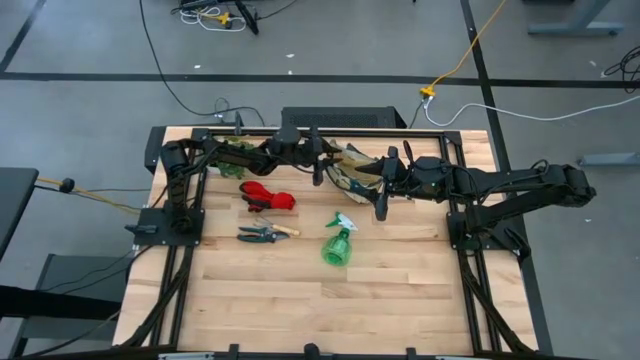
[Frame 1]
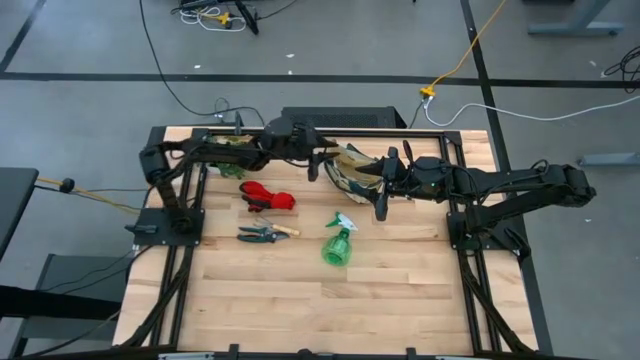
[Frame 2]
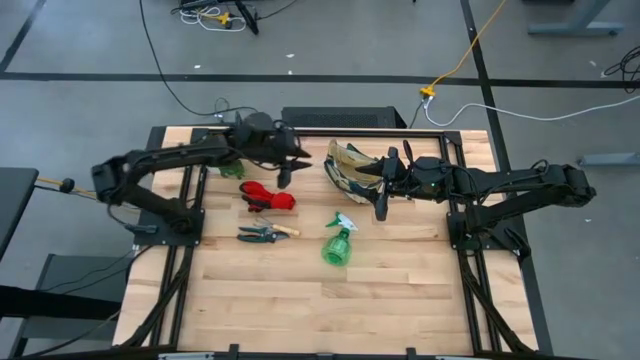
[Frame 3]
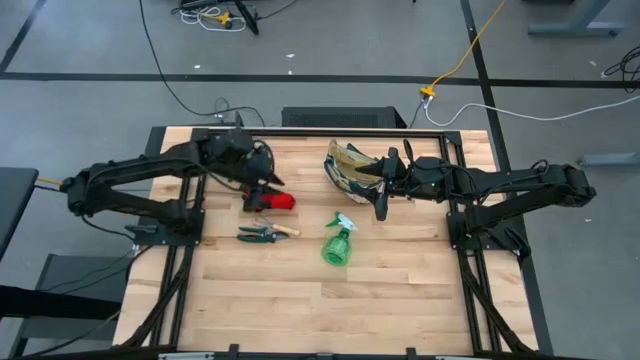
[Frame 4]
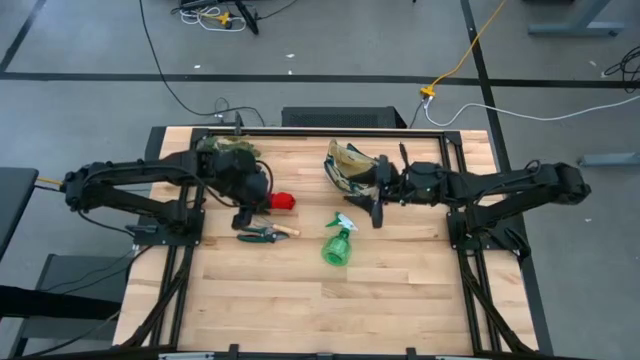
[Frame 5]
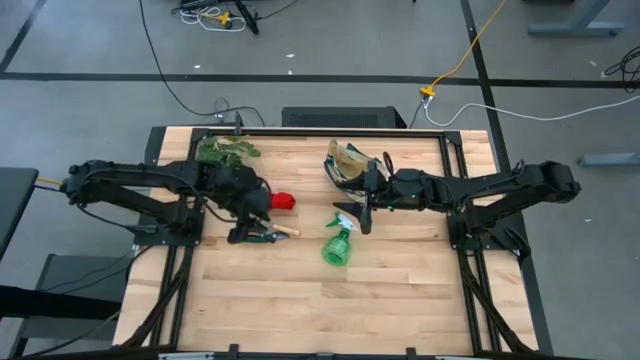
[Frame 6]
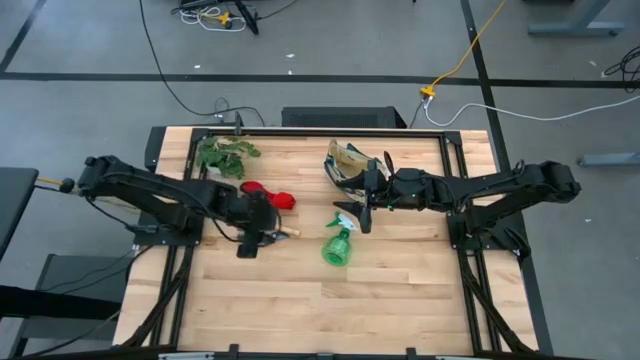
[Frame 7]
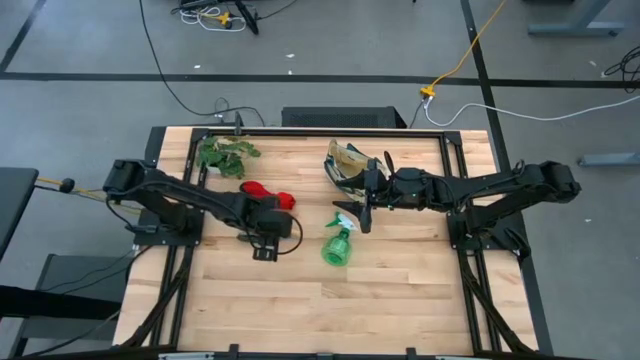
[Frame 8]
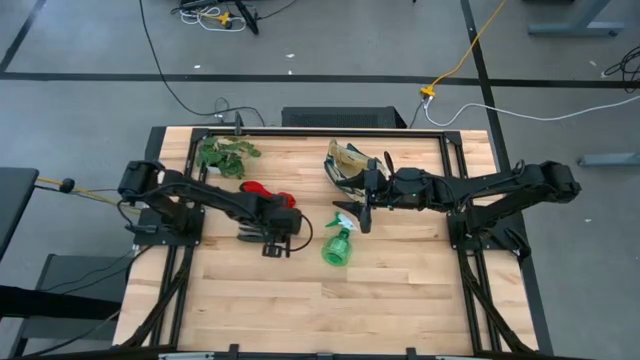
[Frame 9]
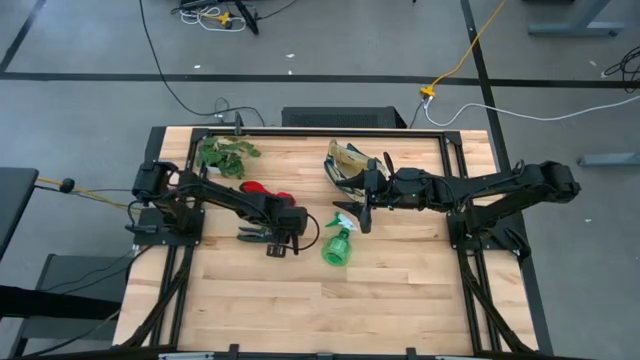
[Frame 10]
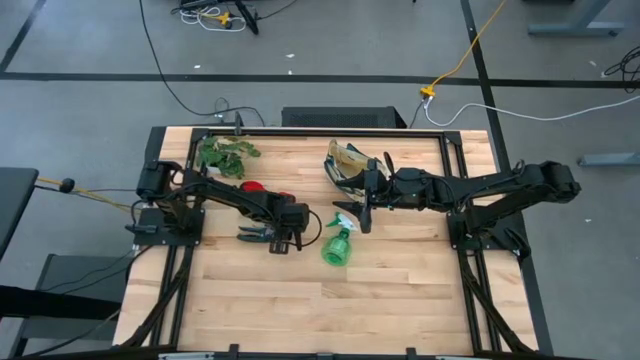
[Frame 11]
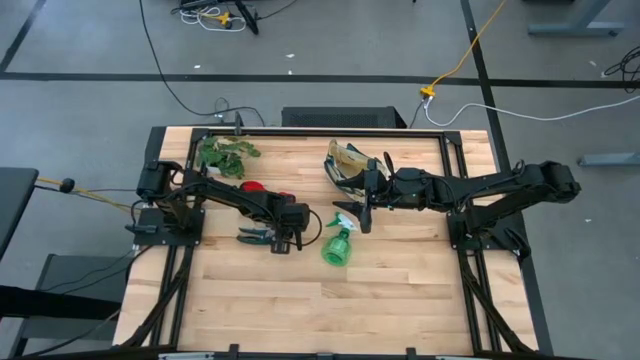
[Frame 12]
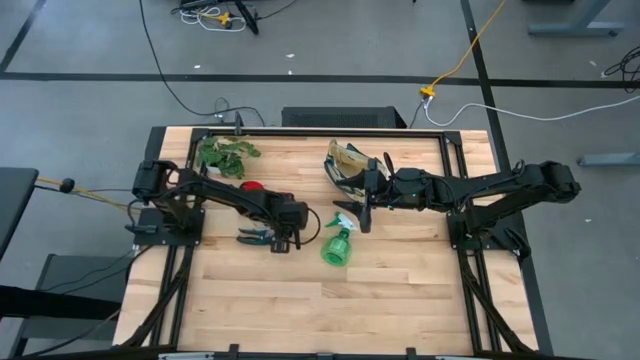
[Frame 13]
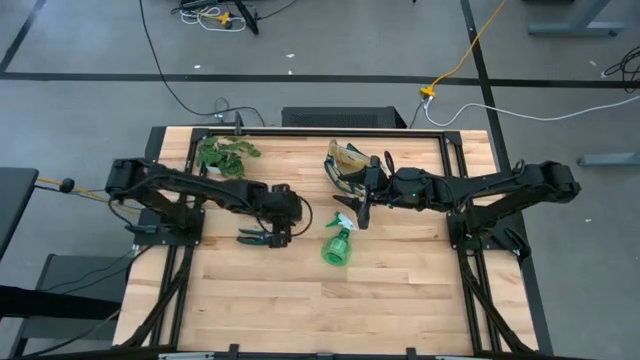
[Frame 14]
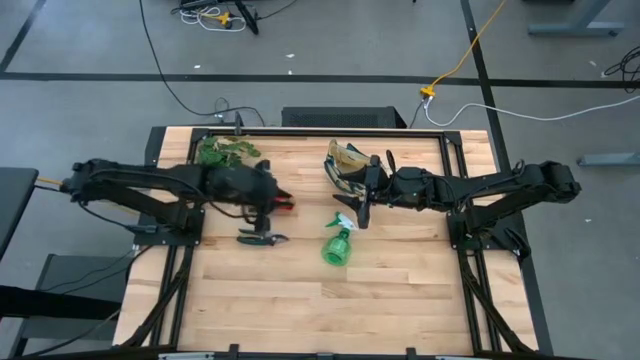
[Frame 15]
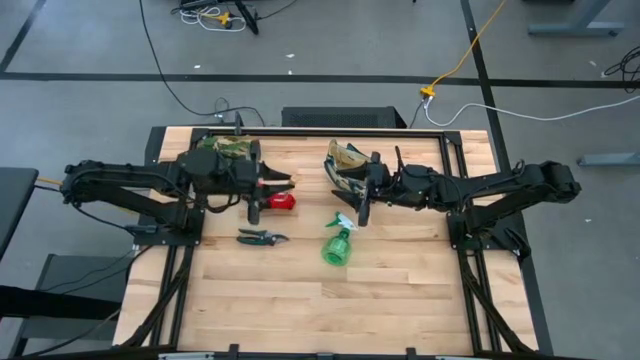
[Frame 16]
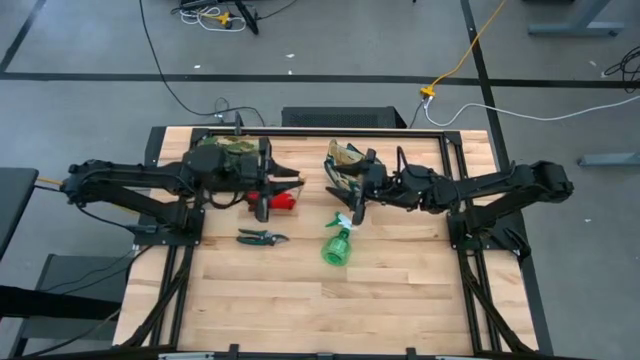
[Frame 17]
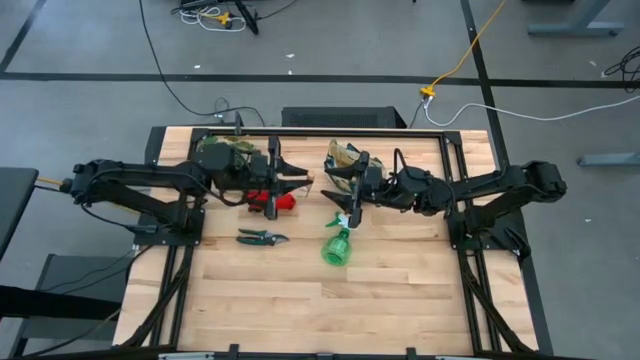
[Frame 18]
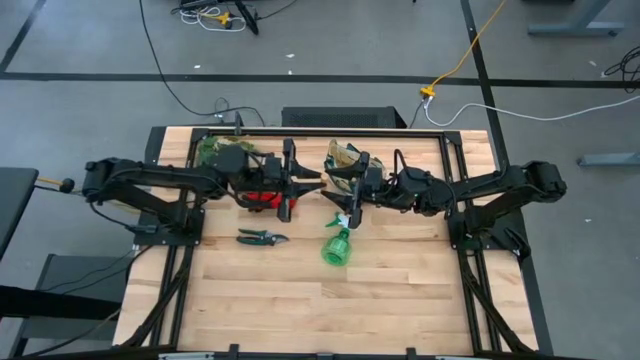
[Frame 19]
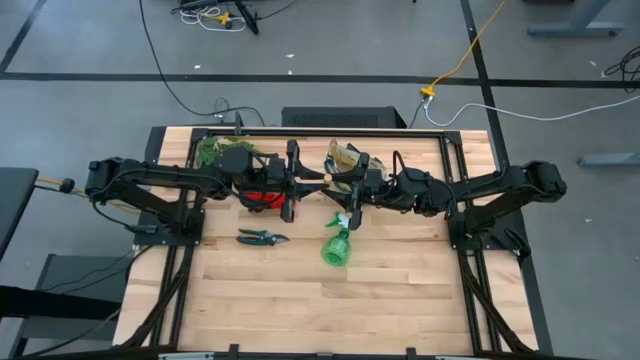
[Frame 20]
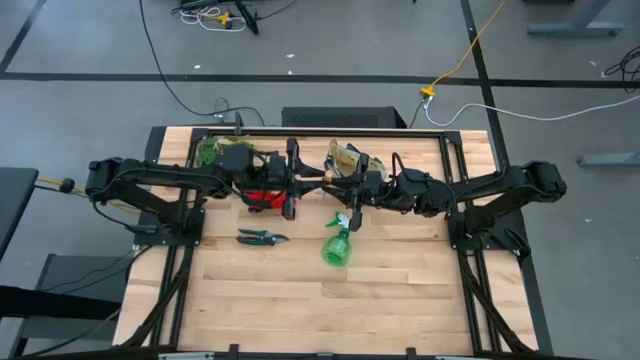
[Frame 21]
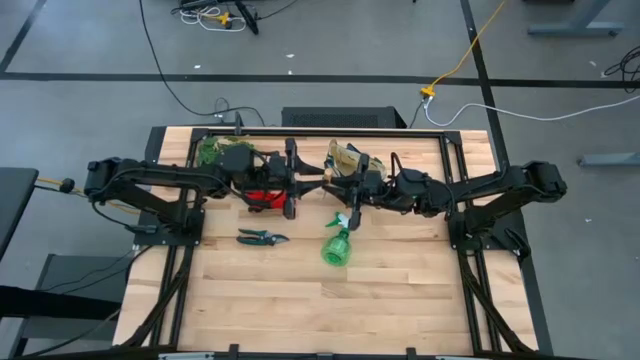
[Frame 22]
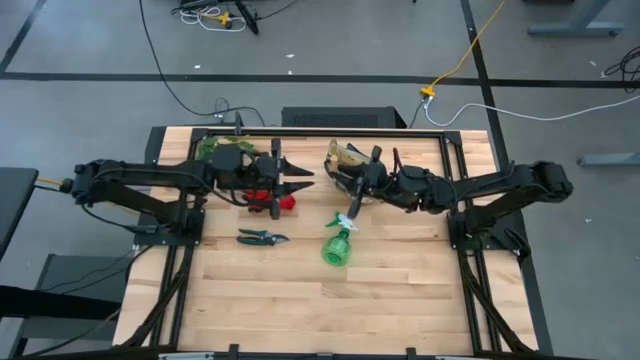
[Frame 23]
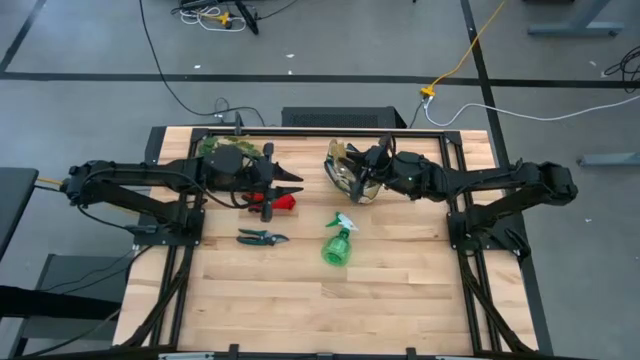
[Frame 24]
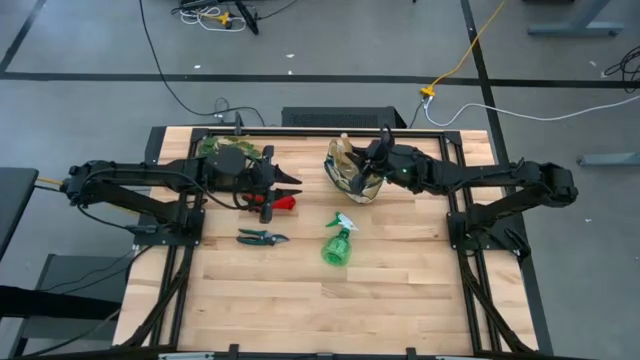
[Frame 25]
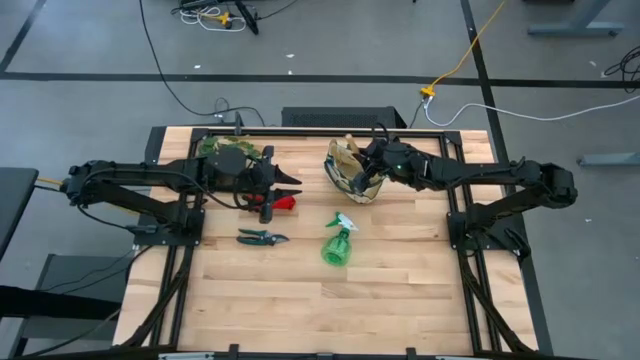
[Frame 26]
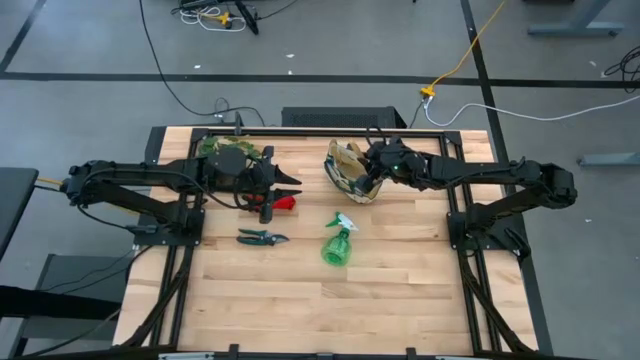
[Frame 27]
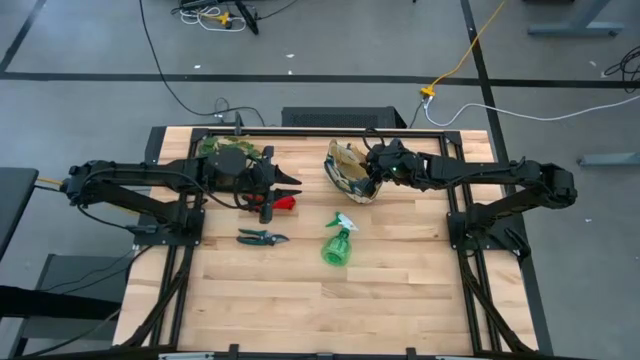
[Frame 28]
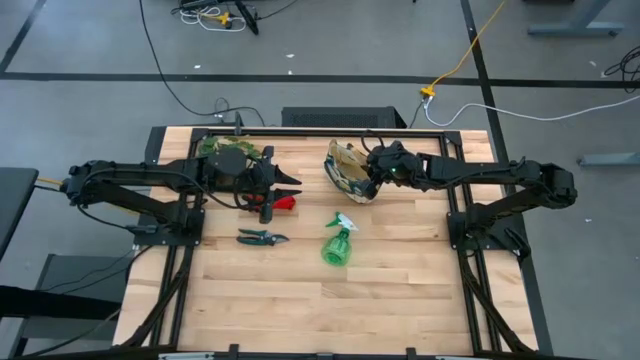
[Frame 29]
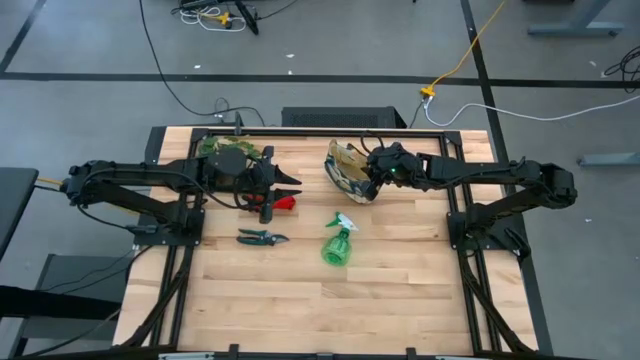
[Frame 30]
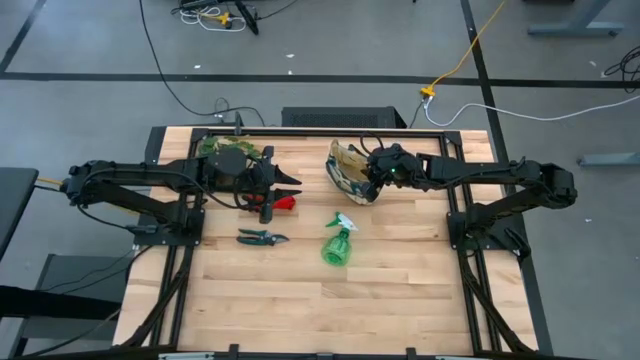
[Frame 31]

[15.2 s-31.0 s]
Task: Pick & Place Garden tools in Gardening bag
Put the brown hand rake into the patterned white gardening bag

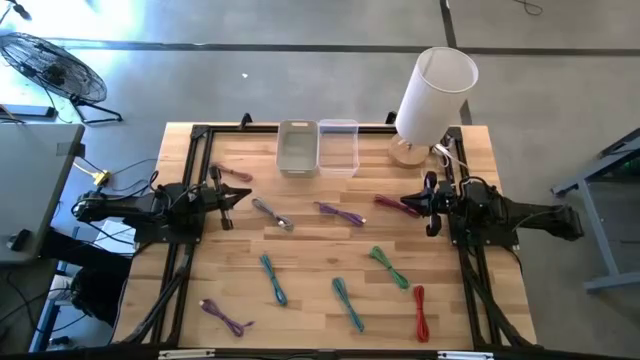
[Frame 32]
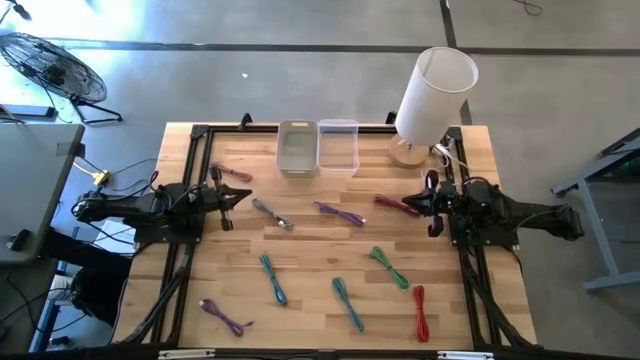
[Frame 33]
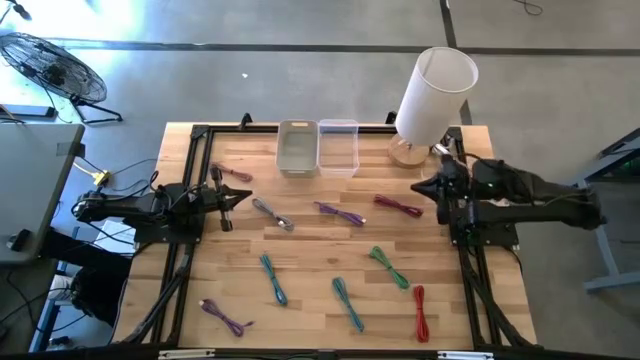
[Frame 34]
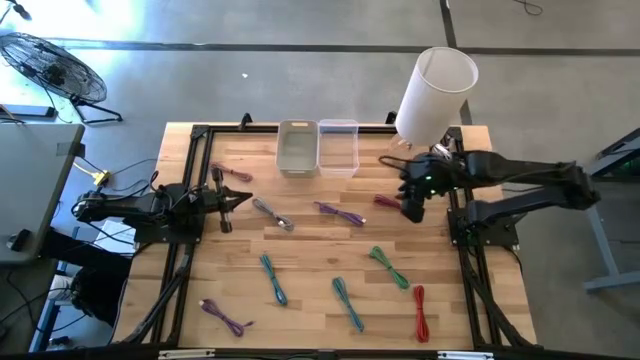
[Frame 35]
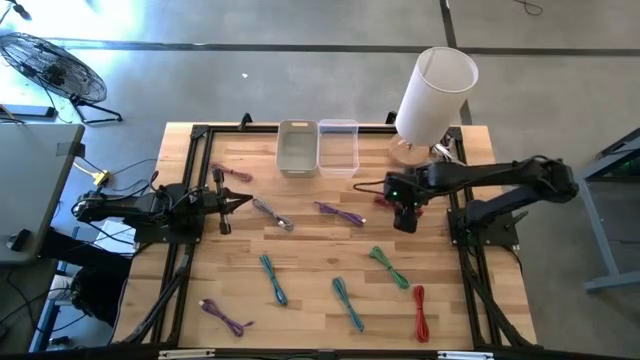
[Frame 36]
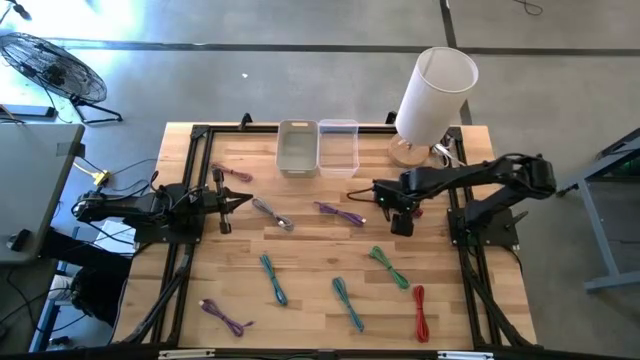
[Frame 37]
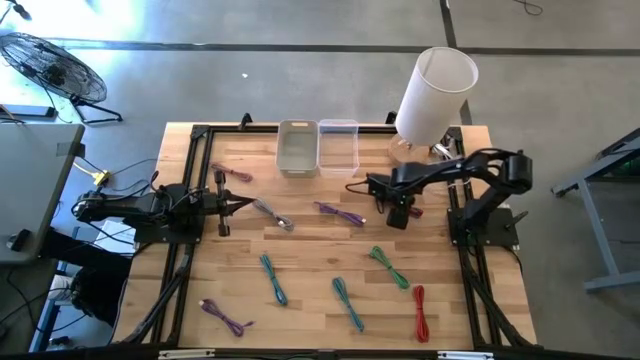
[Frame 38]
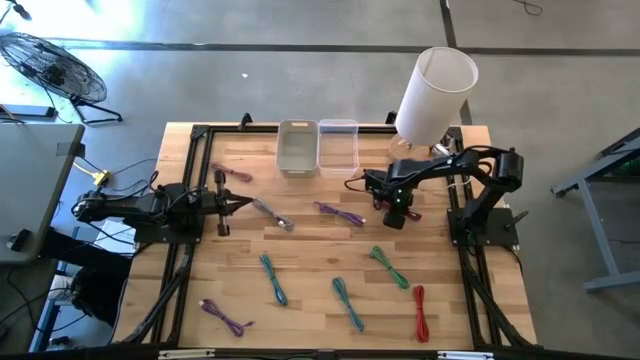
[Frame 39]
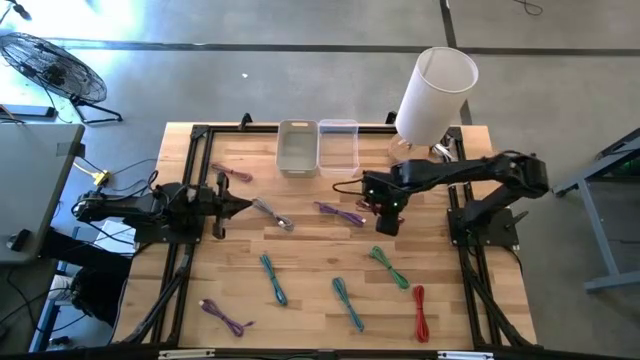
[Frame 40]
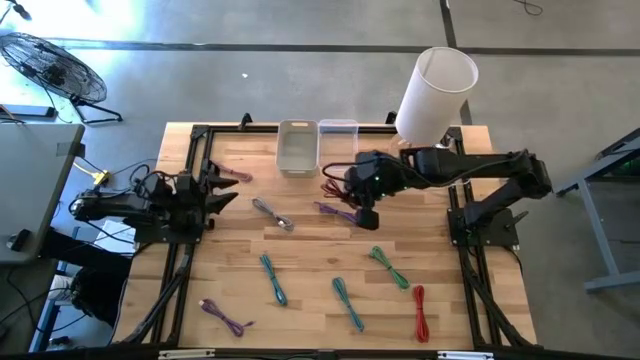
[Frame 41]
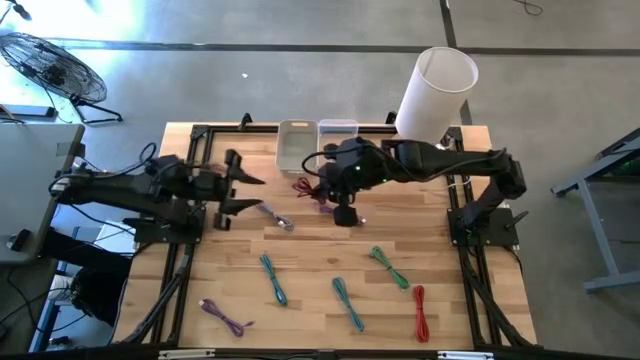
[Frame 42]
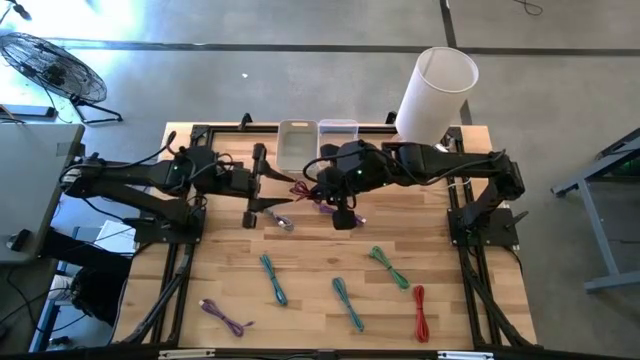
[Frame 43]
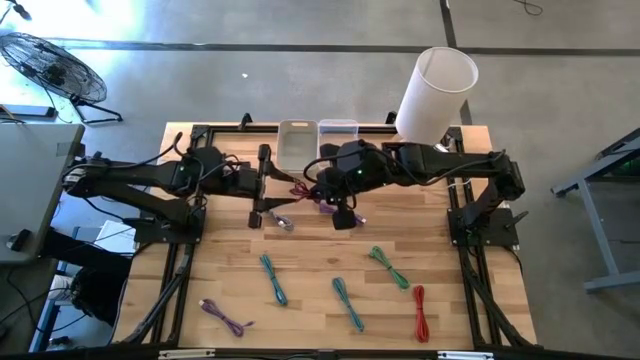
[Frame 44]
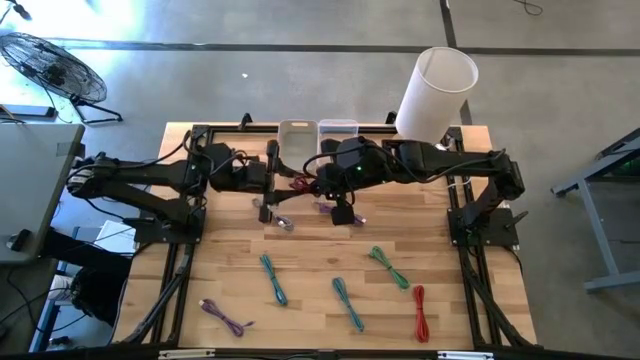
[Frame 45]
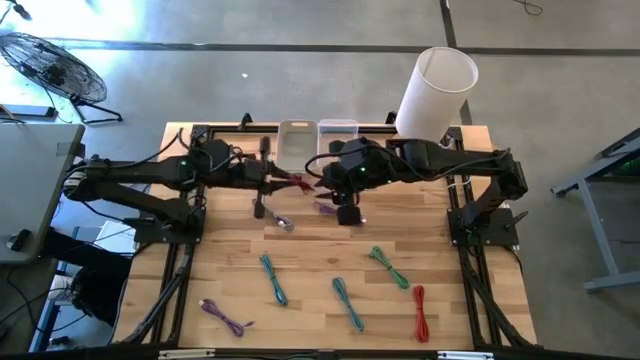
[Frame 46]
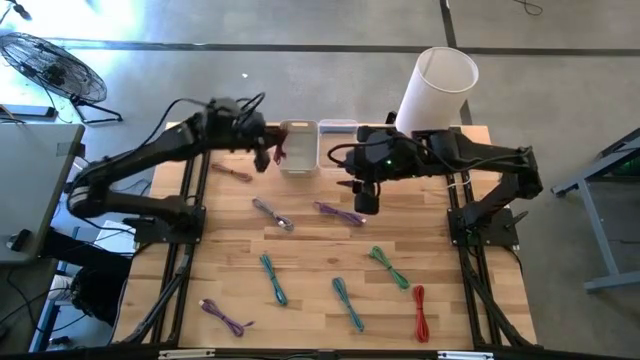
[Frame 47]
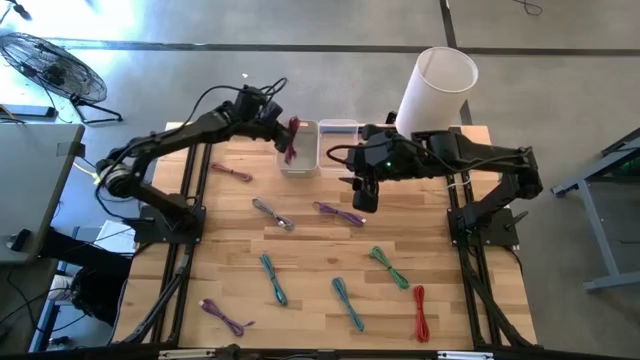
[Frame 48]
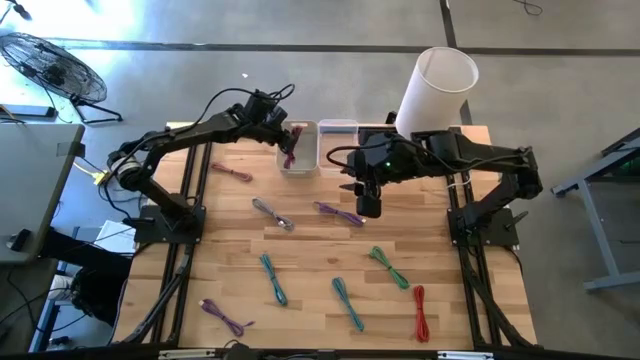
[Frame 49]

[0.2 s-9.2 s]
Task: Pick & Place USB Port
Put the pink and black USB cable into the gray bin
